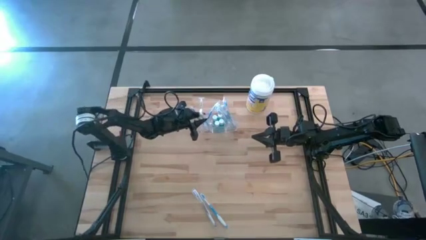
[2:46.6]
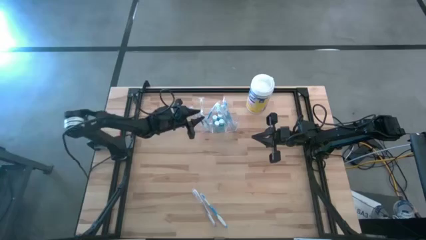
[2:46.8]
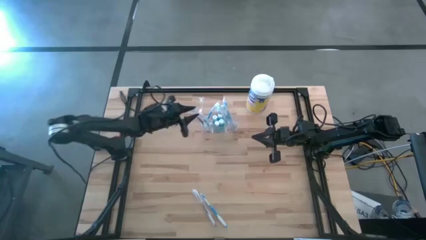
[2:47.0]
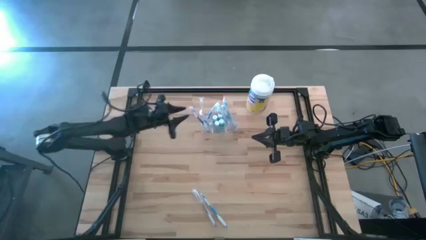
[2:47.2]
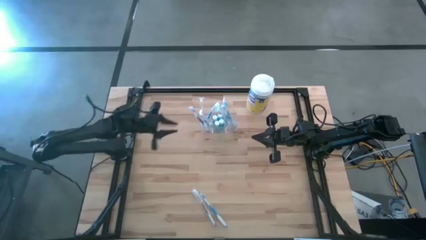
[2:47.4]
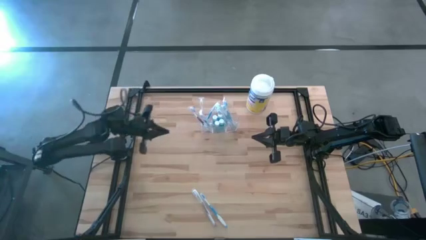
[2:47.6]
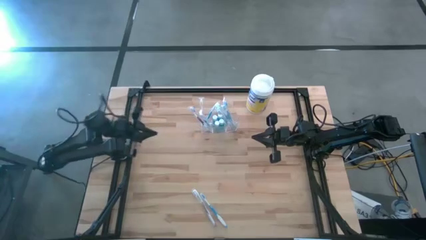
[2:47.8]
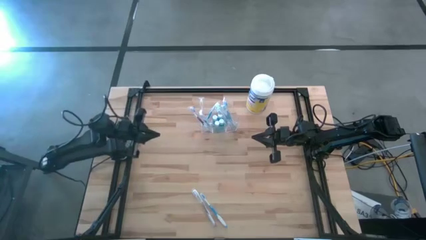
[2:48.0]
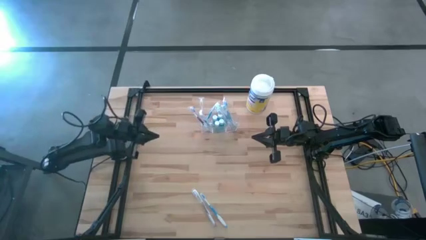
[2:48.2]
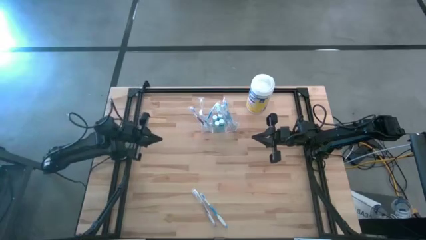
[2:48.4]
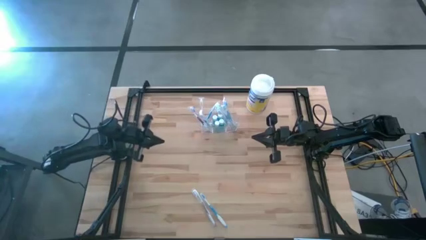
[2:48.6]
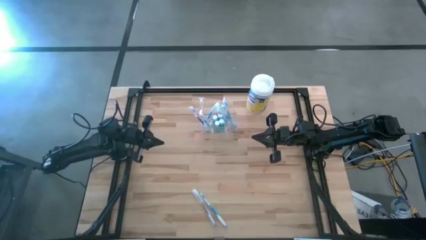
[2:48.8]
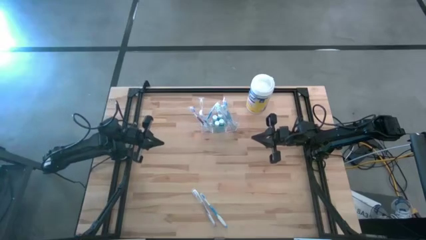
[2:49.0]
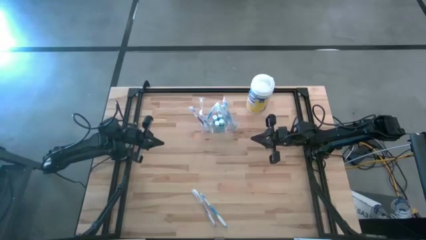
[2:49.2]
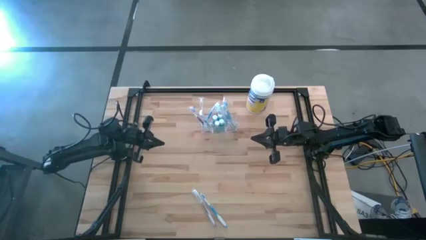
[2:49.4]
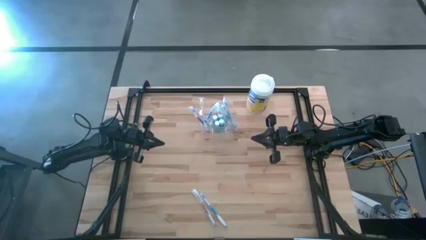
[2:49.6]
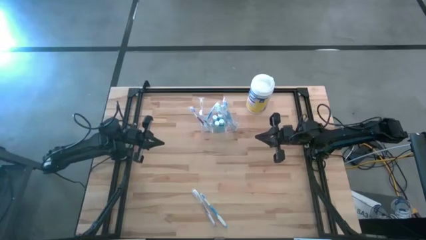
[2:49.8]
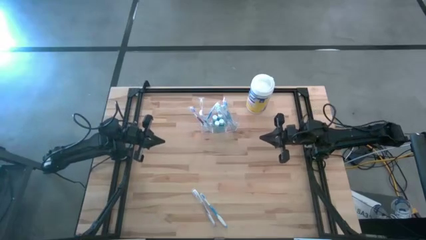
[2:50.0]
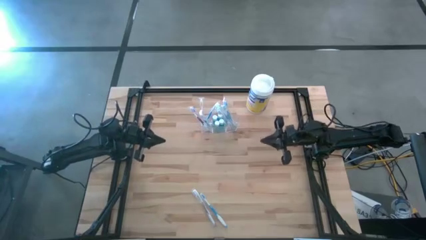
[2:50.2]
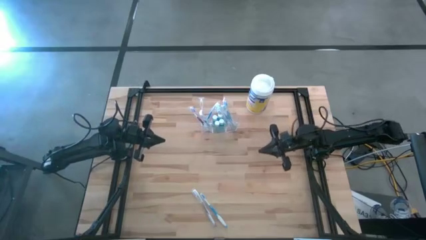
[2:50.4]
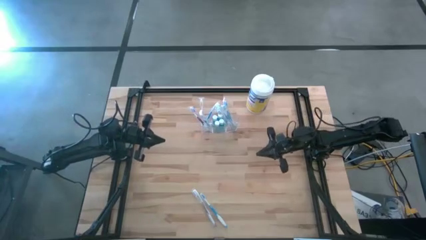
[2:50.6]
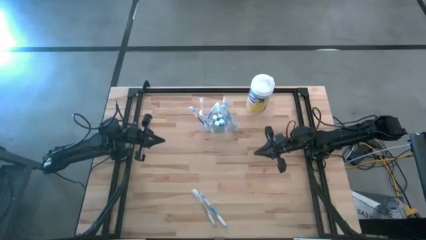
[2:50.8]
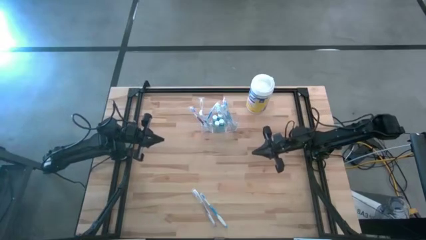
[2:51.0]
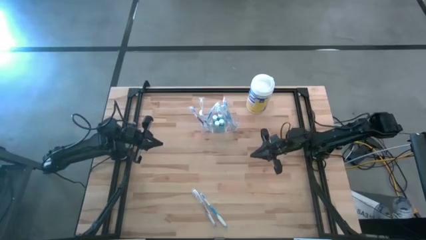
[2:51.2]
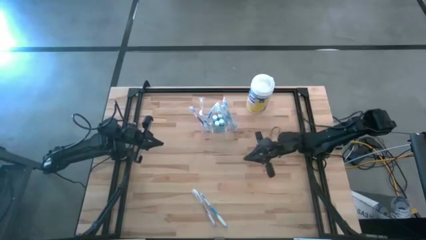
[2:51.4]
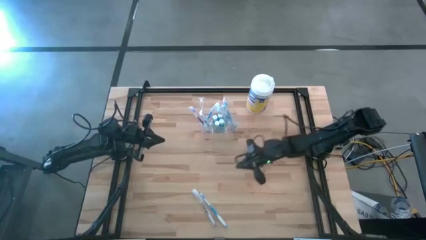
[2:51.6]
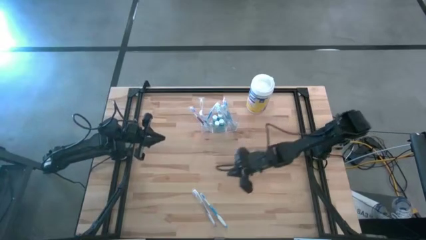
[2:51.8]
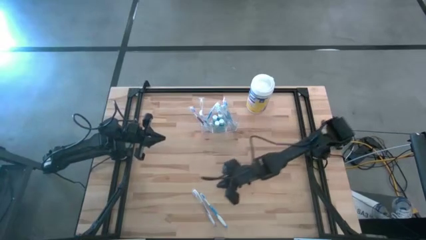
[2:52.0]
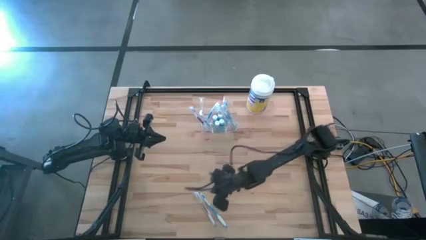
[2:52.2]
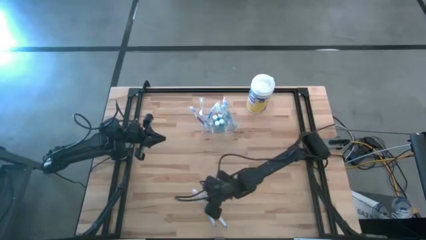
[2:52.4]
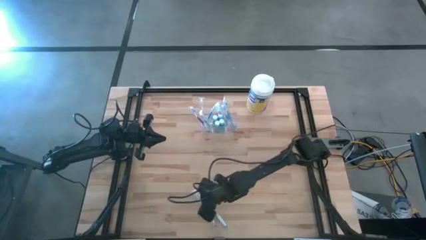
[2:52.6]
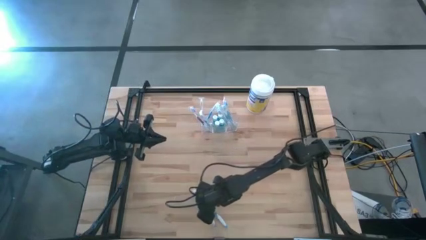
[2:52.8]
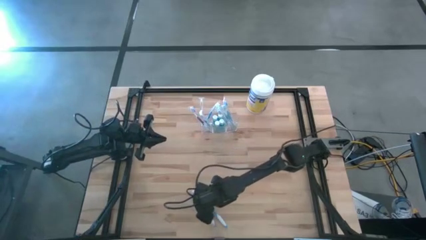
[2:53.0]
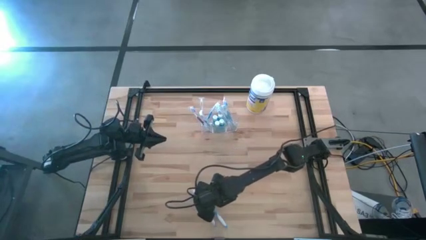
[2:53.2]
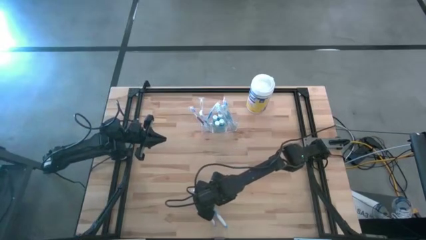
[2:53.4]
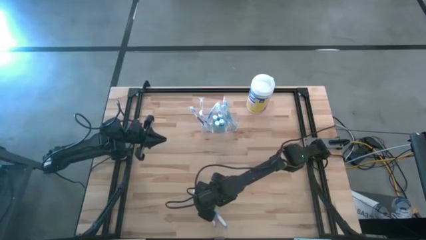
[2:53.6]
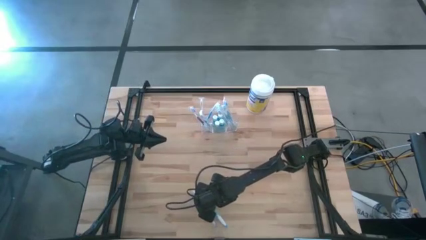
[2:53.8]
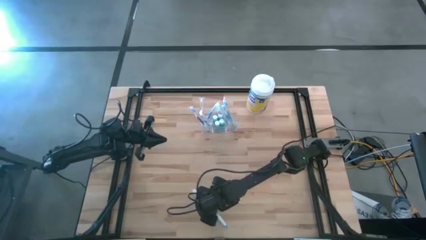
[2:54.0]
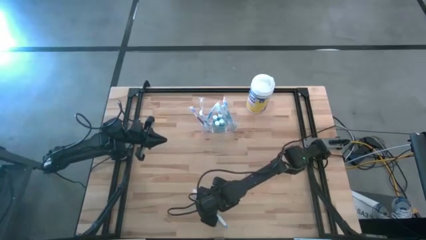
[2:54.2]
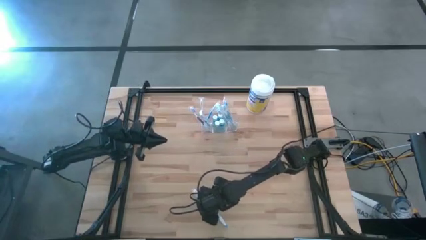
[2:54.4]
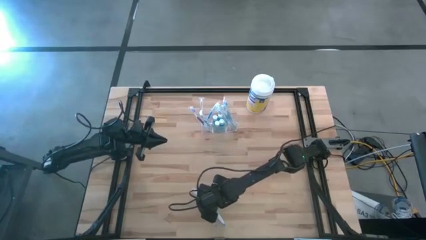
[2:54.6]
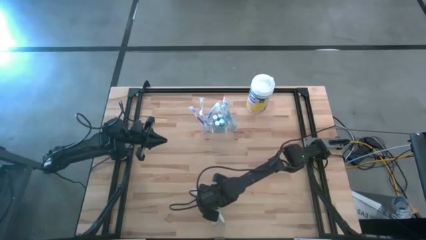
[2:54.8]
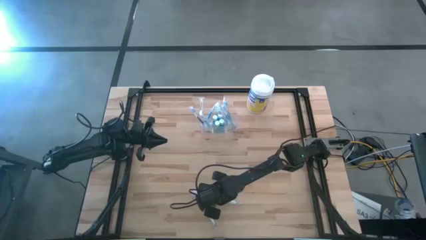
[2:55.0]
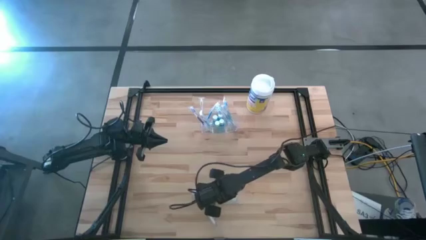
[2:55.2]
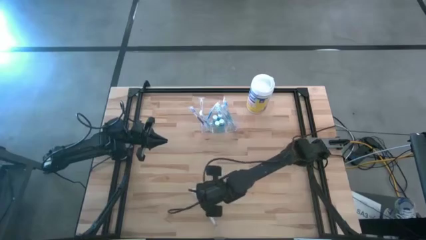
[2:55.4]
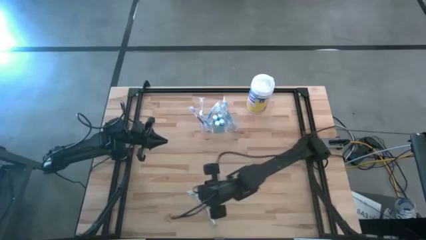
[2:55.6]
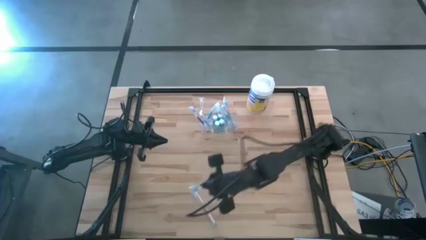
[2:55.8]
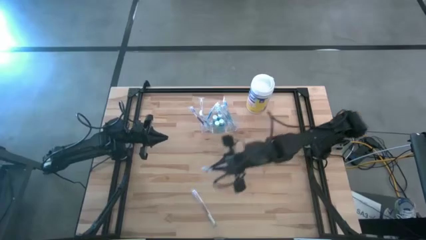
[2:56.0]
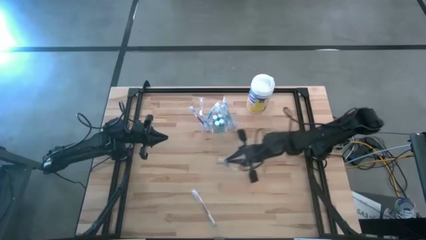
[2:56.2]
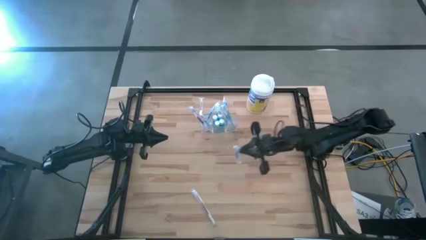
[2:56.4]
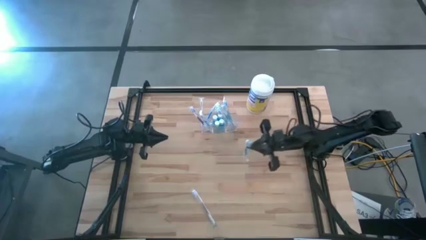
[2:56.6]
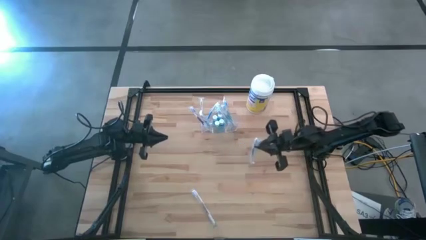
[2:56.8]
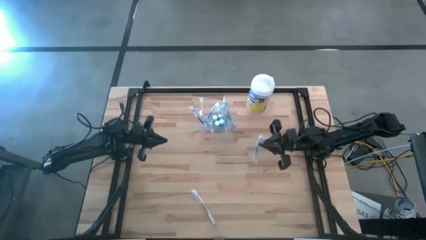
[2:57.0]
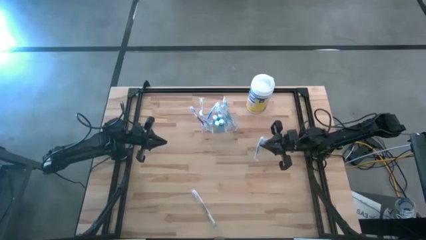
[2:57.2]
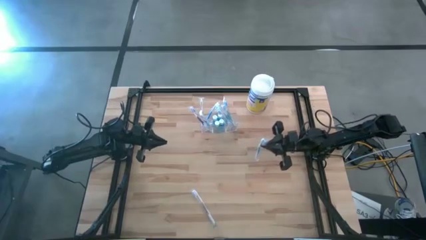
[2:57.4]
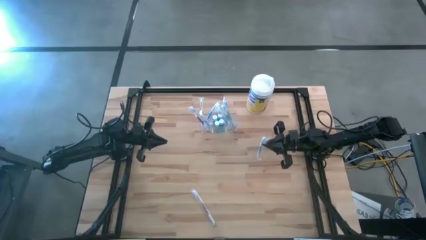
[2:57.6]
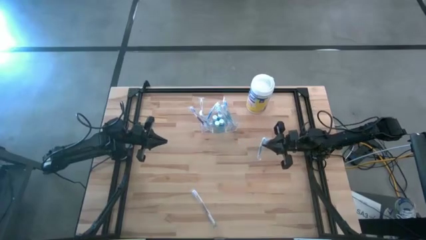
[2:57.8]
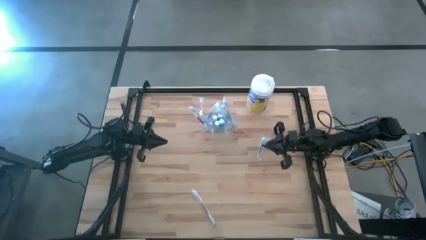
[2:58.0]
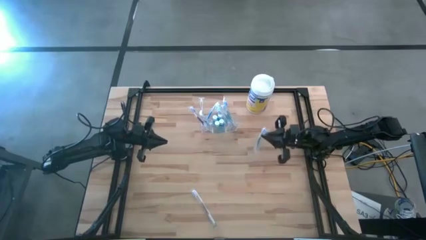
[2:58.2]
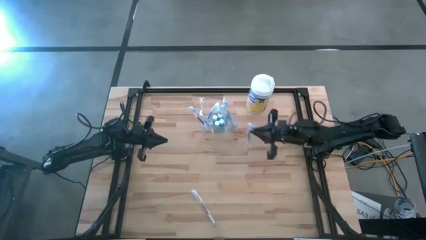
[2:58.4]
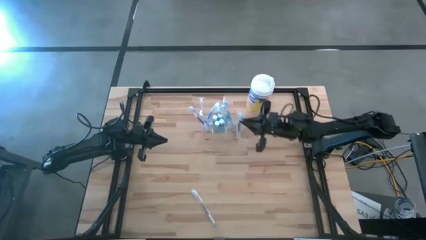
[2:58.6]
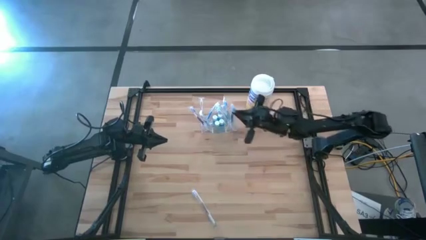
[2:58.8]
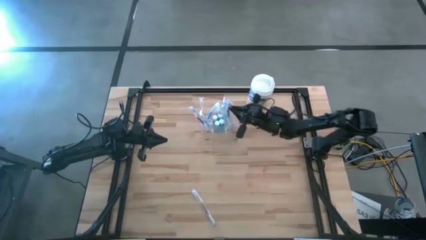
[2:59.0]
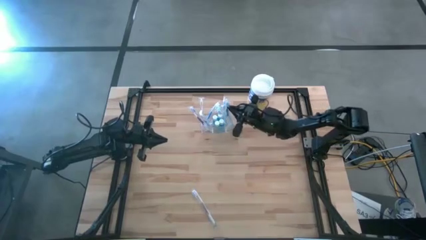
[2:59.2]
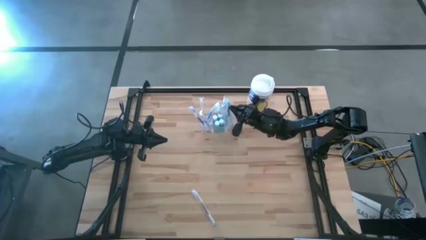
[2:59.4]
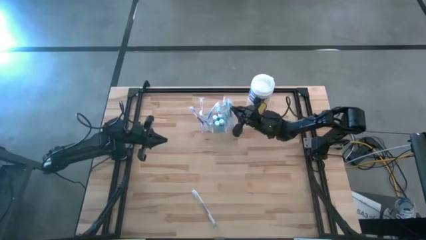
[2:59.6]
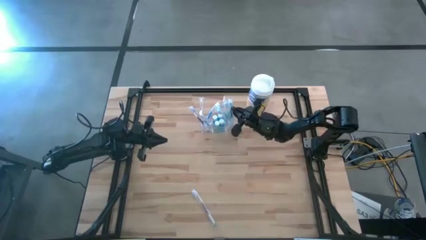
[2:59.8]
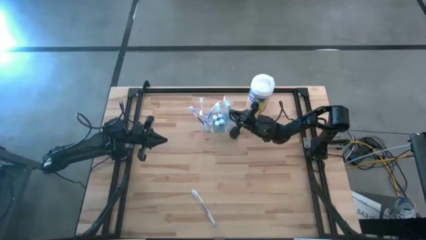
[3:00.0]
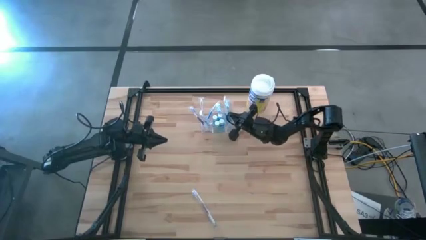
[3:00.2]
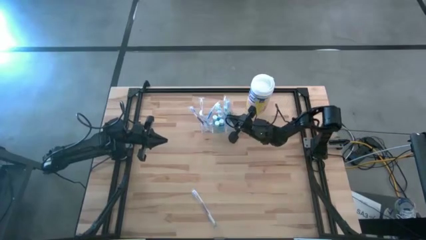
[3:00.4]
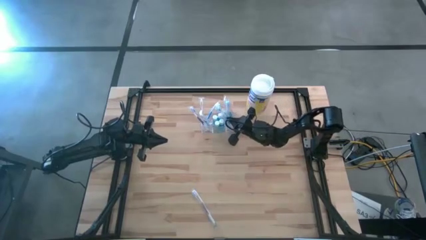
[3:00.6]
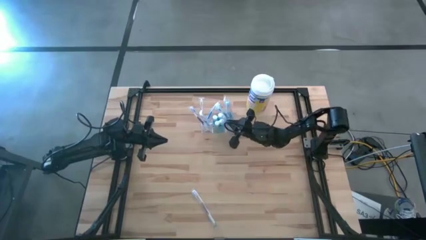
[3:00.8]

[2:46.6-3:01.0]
Task: Pick & Place toothbrushing station
Put the blue toothbrush into the transparent organizer

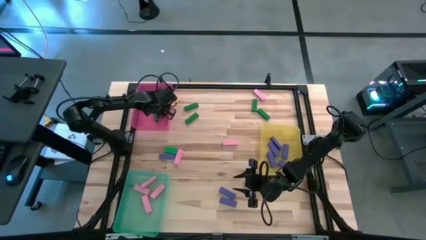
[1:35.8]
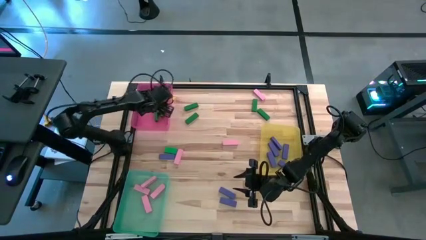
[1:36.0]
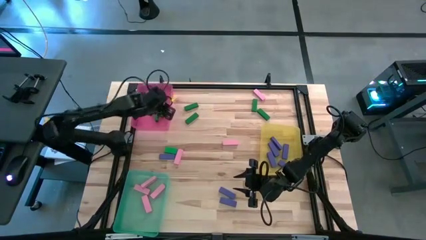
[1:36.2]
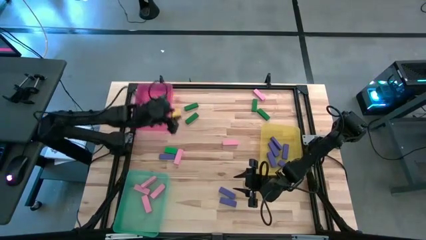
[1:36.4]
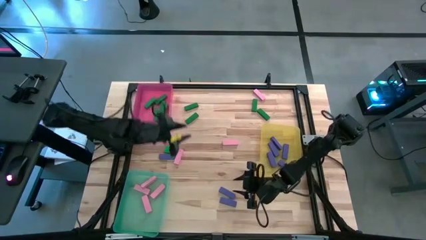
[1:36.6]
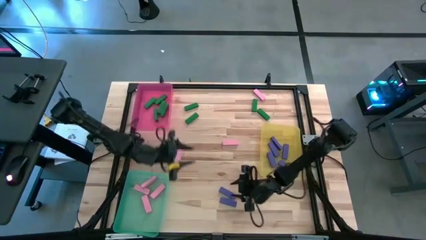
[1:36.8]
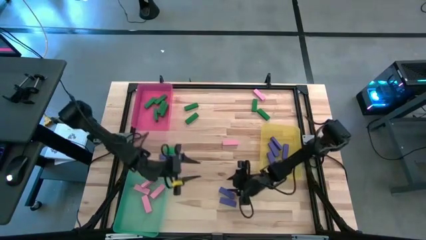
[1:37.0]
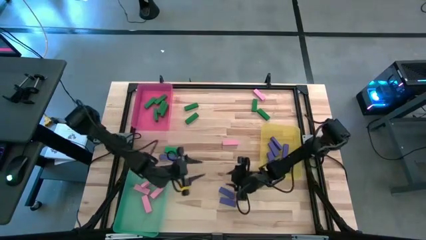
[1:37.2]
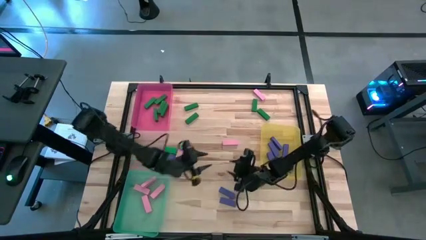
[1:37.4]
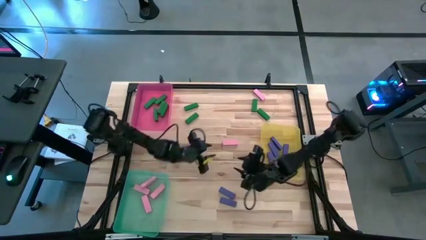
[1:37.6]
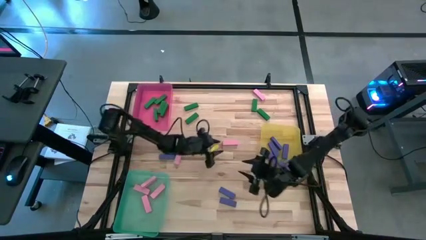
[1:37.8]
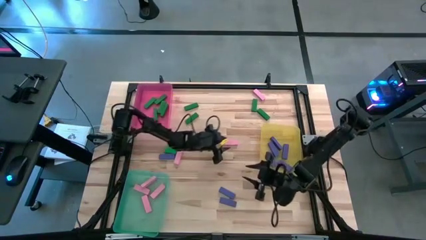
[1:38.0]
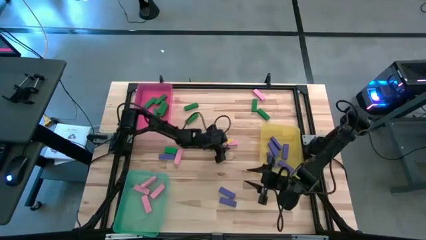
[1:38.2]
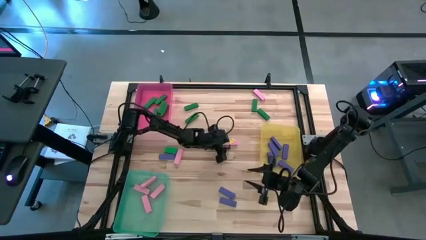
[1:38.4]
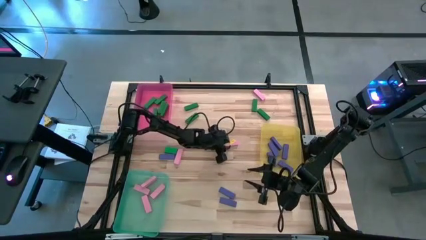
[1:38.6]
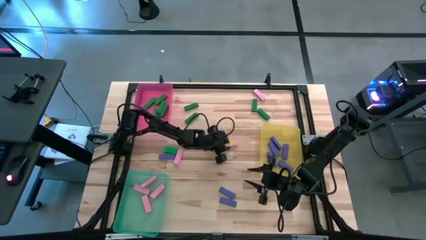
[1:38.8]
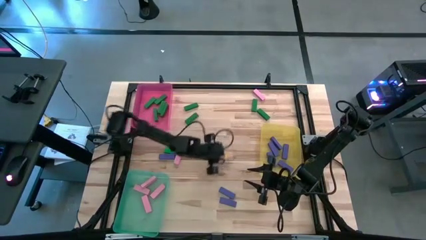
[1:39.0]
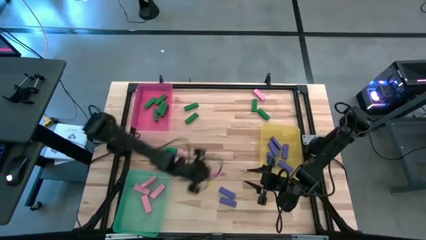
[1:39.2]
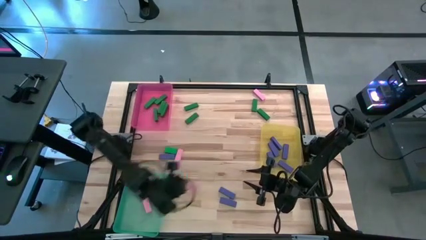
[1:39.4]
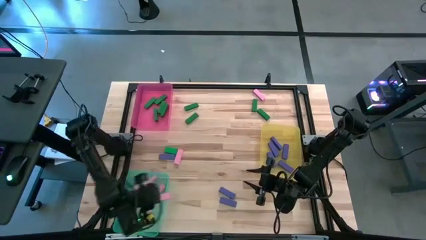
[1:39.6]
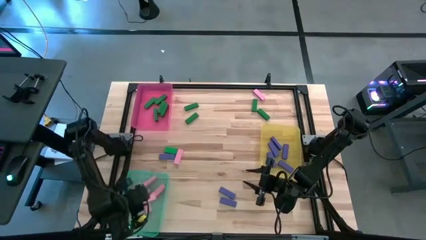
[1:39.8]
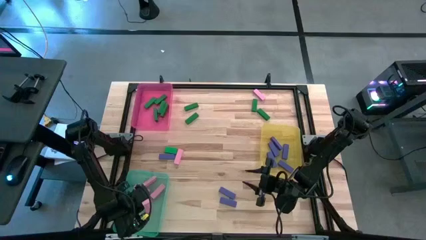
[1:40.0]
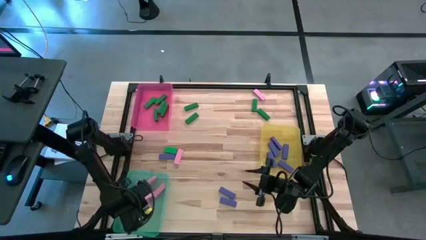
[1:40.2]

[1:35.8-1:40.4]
Task: Sort blocks
Put the pink block into the green bin
